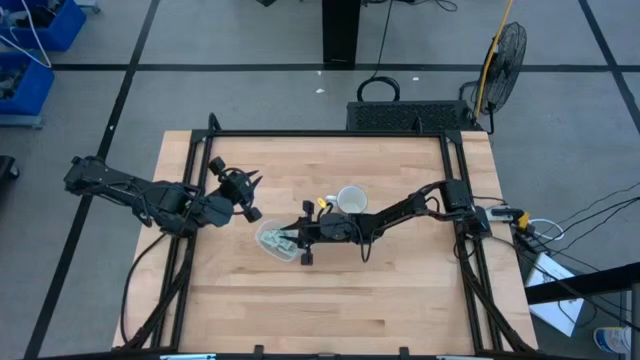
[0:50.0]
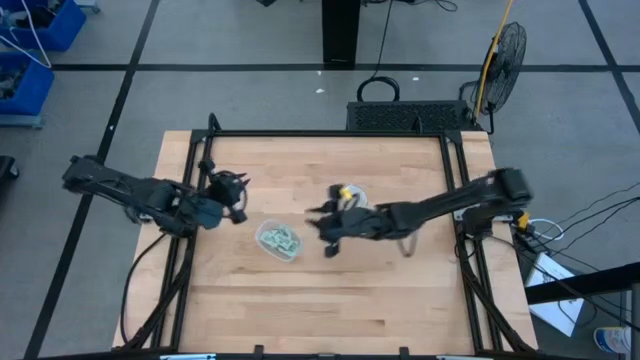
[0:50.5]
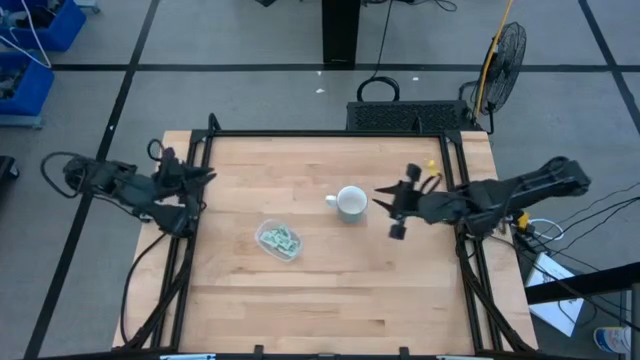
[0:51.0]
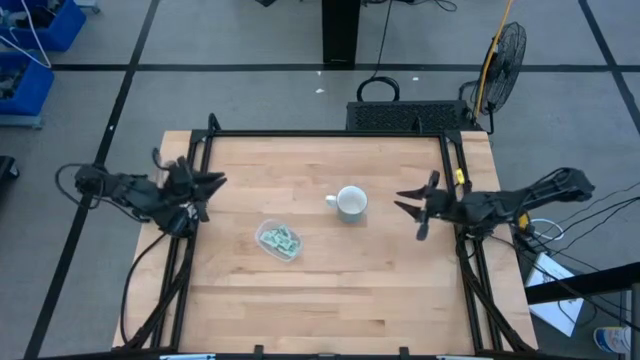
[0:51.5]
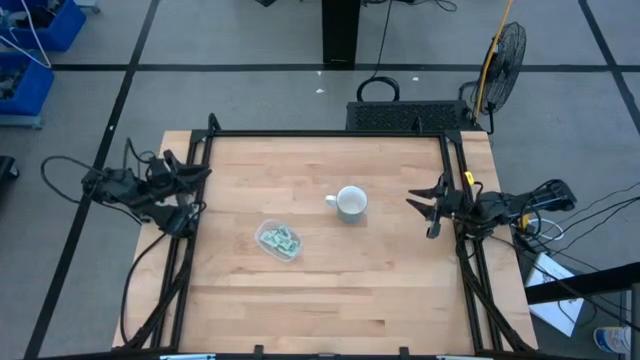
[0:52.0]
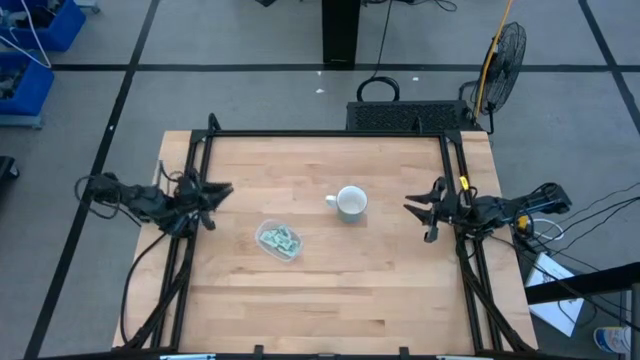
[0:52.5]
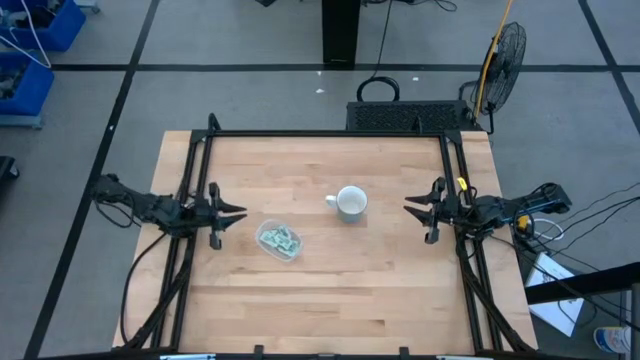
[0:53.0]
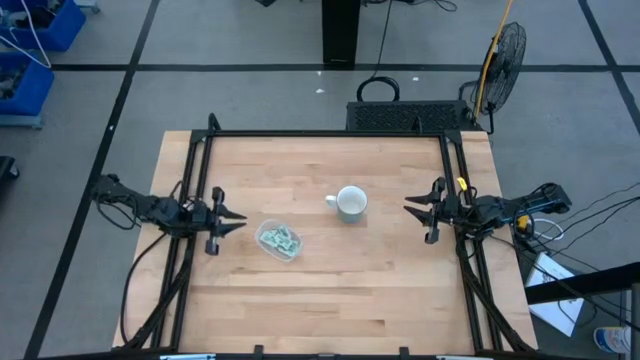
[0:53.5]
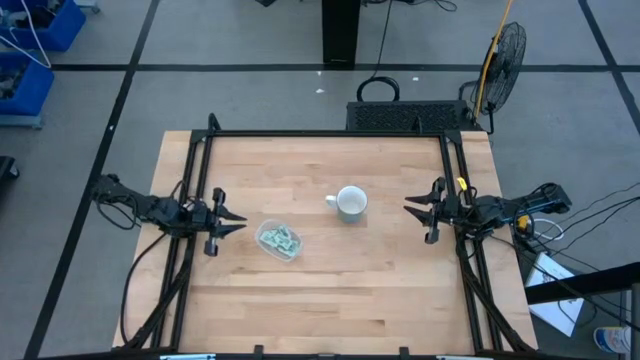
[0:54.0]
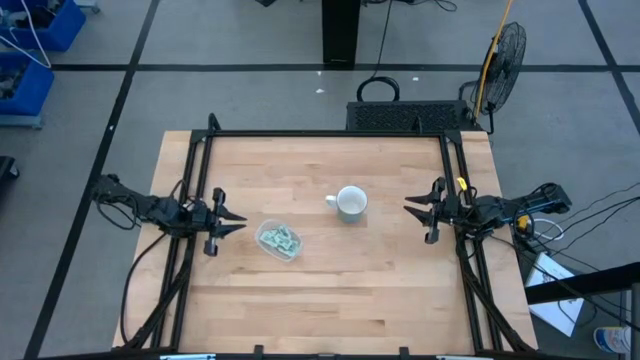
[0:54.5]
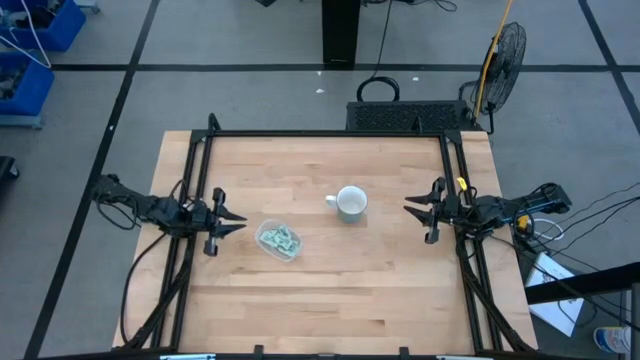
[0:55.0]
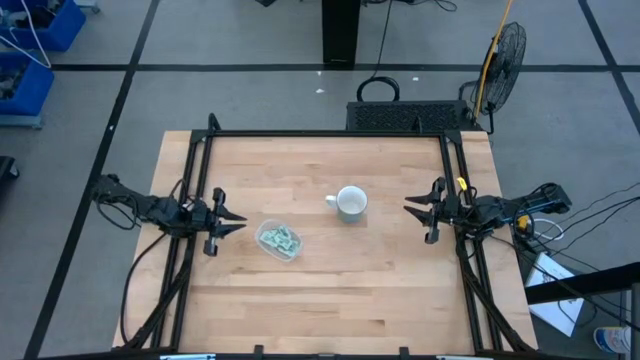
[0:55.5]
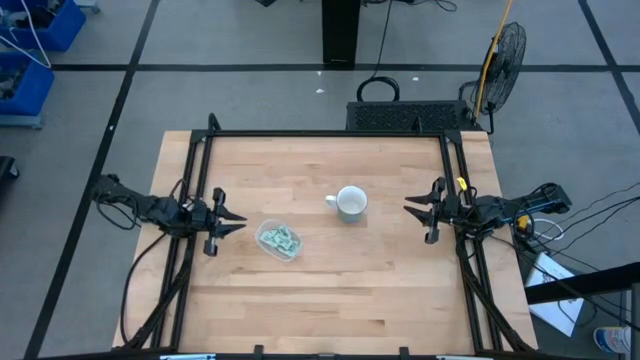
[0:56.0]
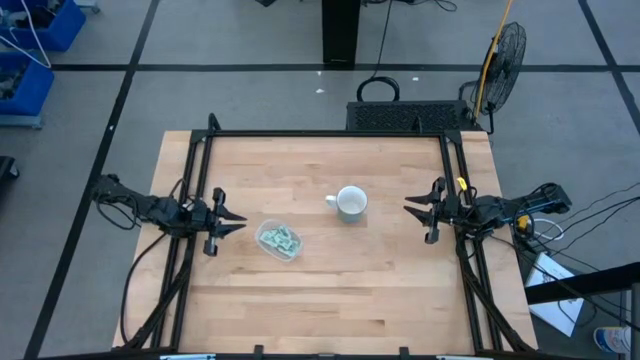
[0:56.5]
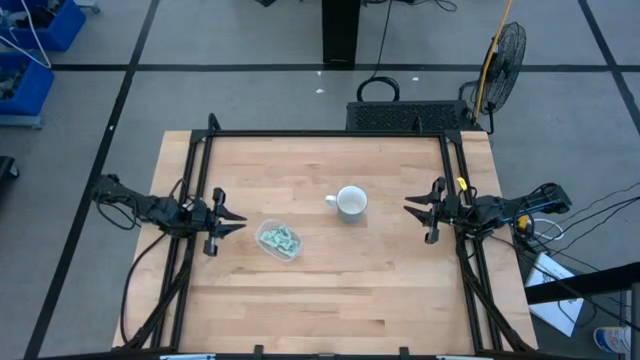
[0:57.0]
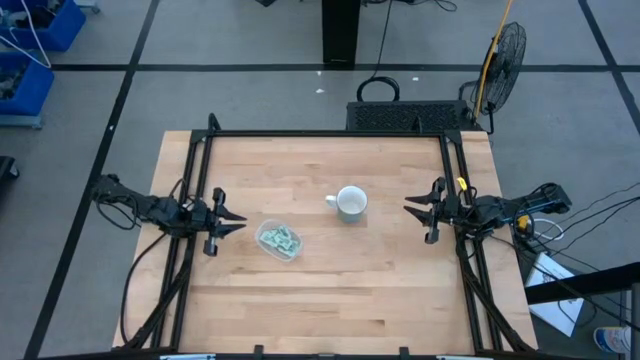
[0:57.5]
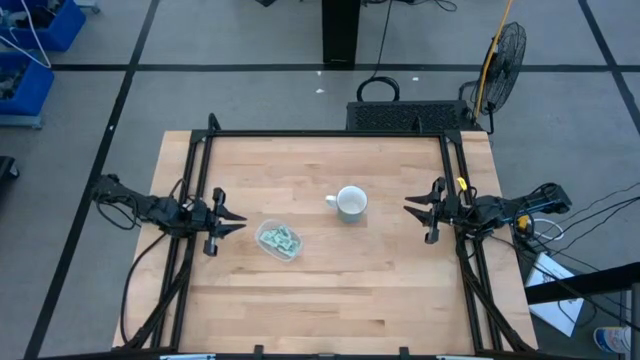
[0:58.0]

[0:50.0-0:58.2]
Task: Pick and place Stevia / Truvia into bins
Return to Home Position

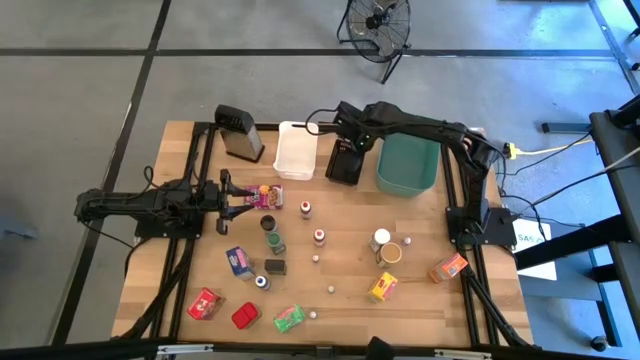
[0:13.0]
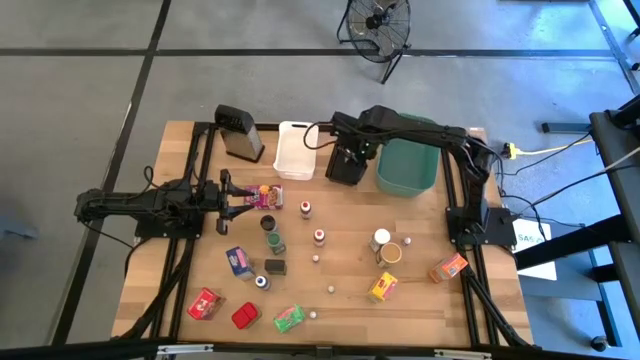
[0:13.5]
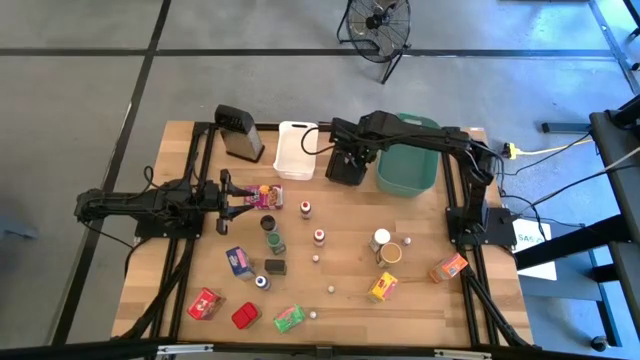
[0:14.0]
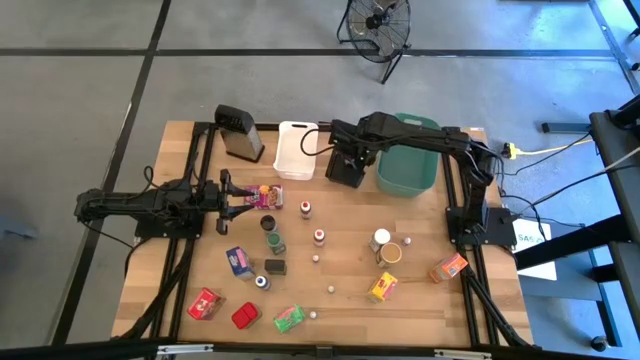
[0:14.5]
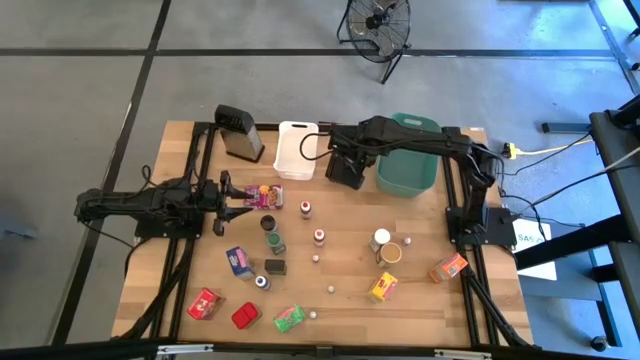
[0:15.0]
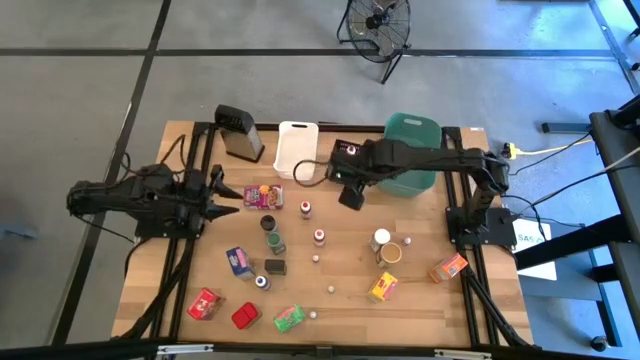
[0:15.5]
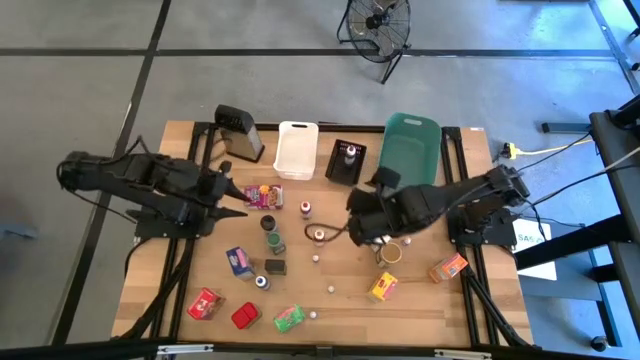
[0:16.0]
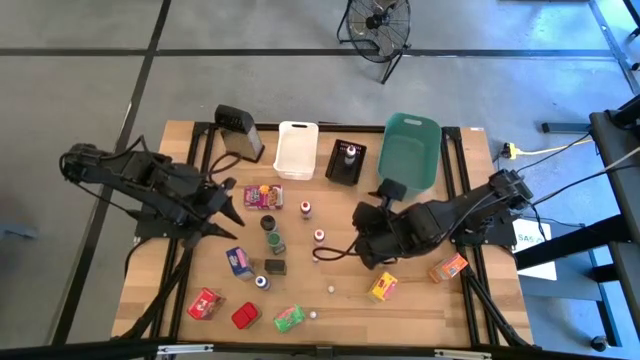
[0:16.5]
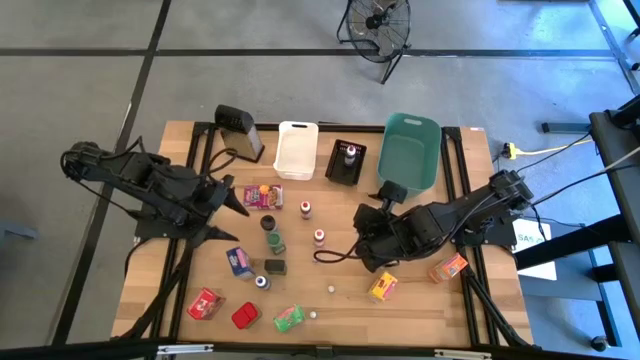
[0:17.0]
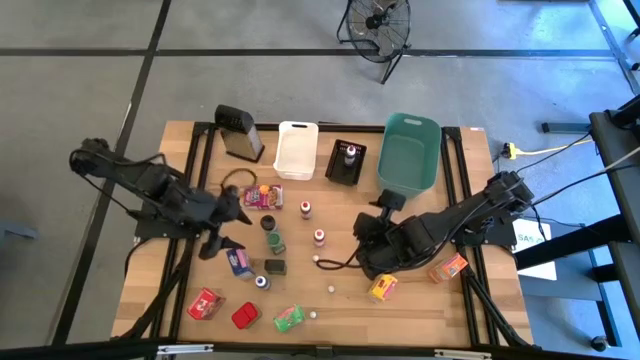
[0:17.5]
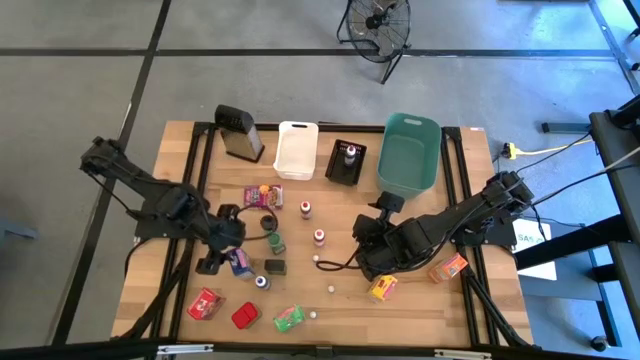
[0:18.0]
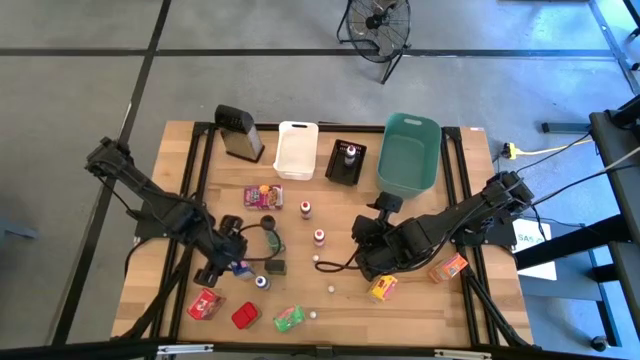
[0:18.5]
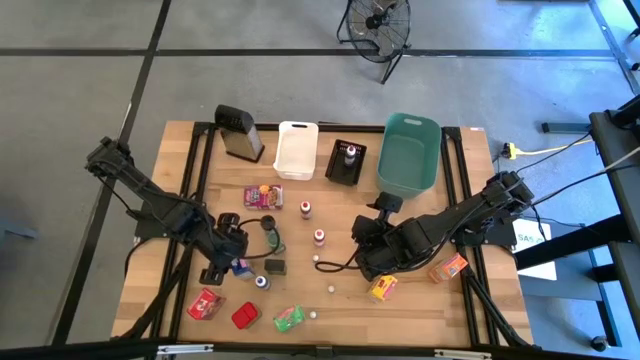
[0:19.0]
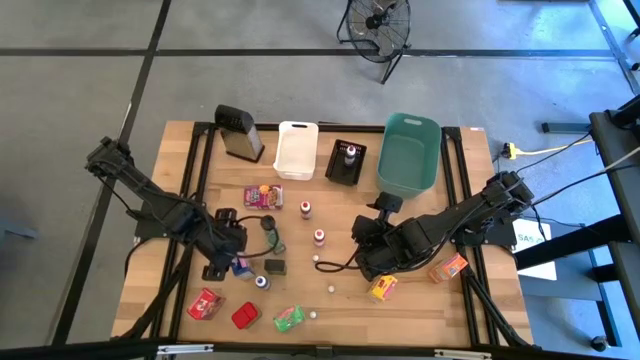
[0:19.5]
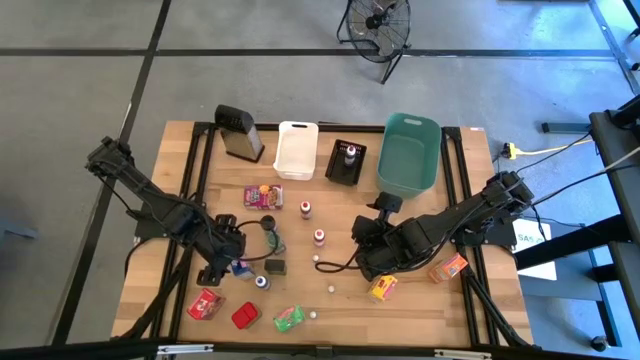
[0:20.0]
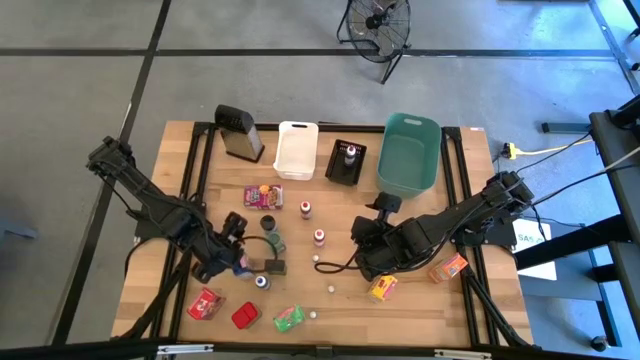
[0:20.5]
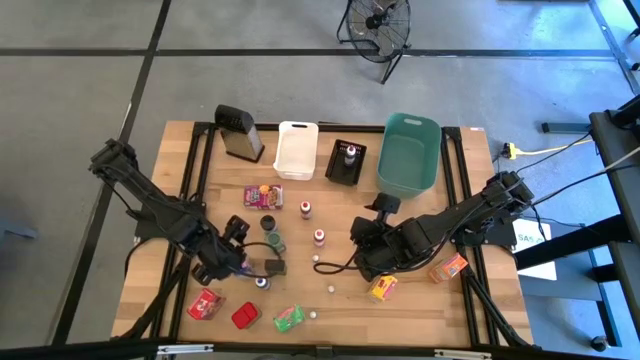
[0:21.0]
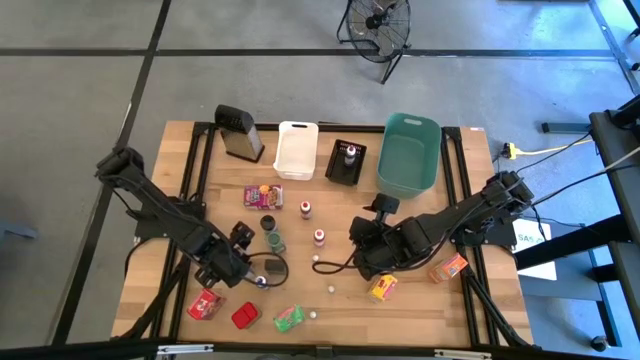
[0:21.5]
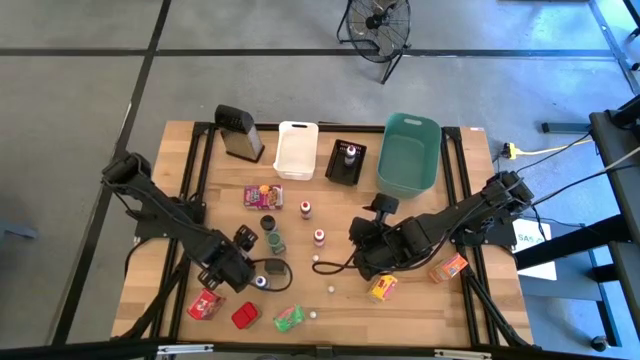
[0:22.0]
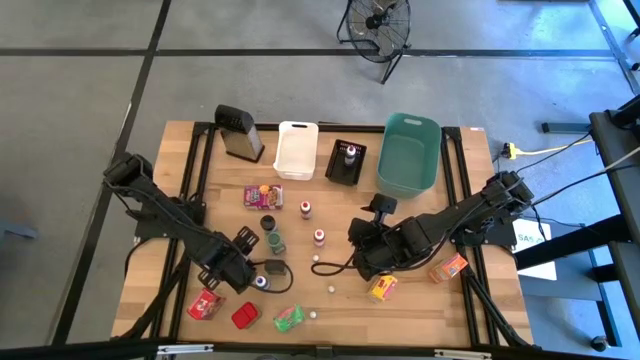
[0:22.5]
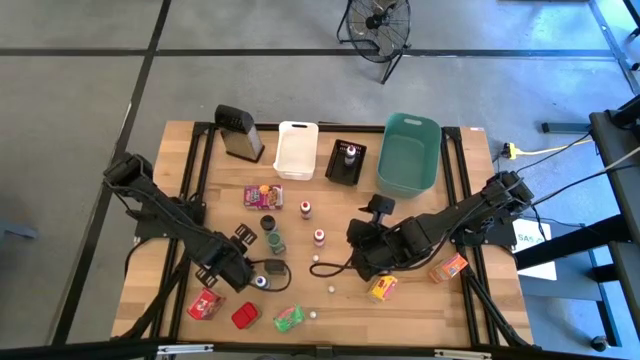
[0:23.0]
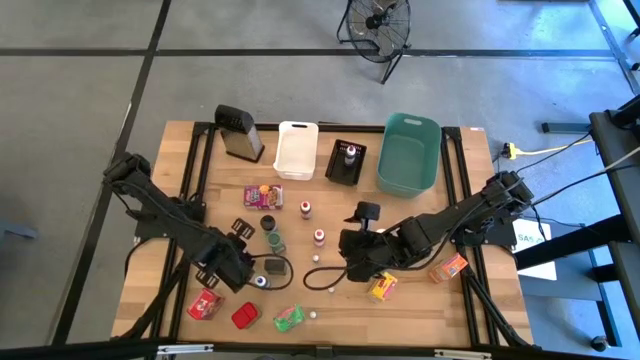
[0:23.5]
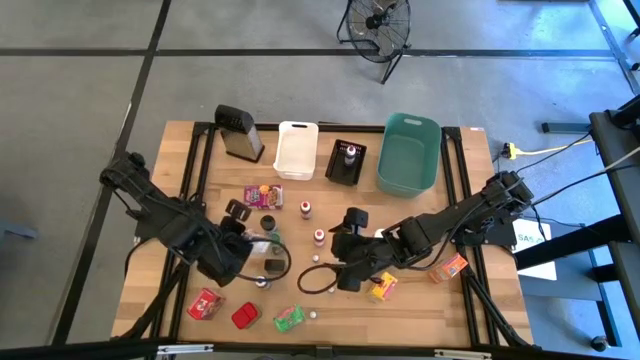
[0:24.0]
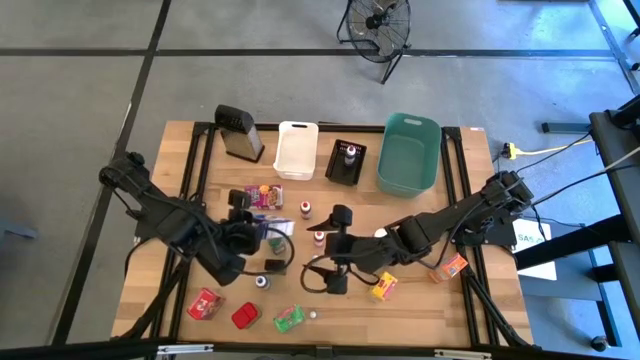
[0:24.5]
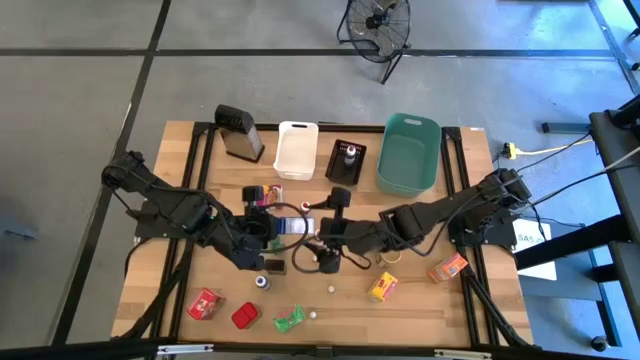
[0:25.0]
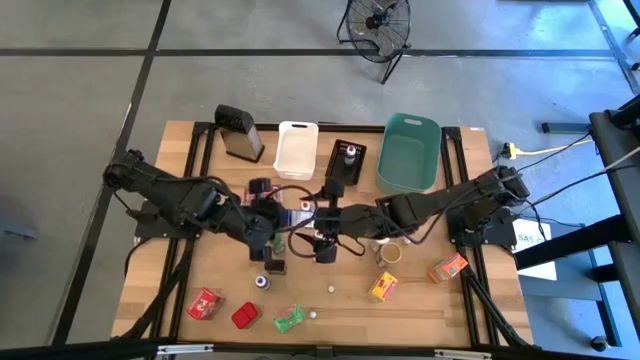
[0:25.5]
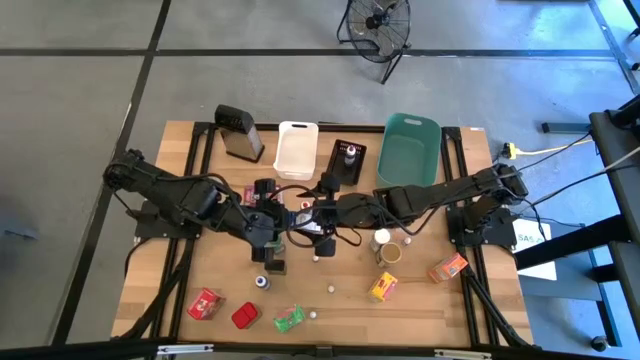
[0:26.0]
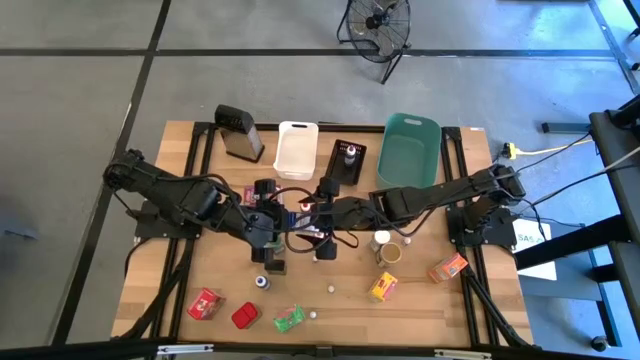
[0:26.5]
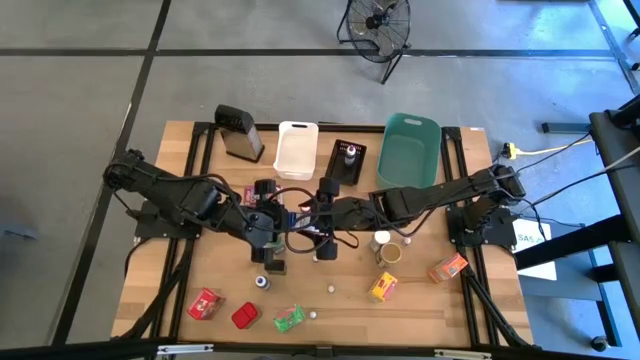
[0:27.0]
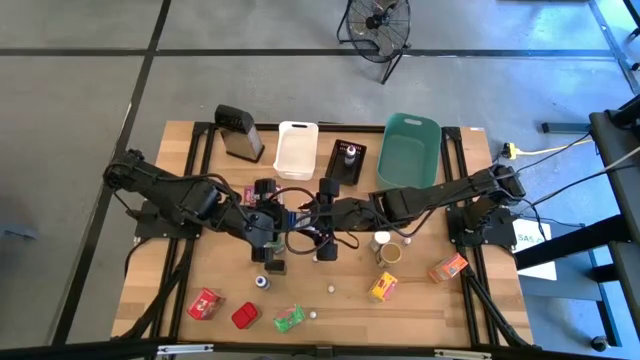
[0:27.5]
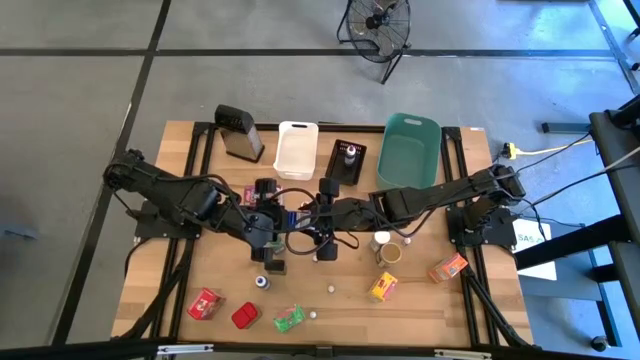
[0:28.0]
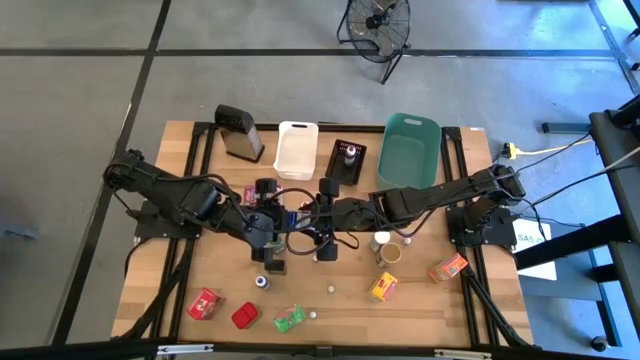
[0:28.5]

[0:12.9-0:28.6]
Task: Pick & Place Kitchen Items
Put the blue cereal box into the green bin
